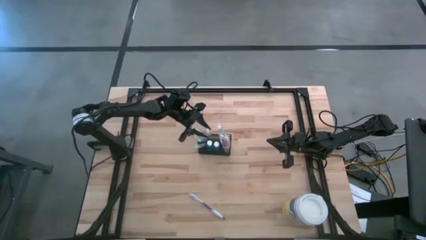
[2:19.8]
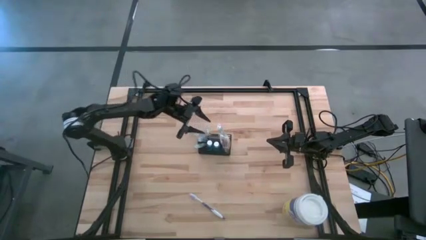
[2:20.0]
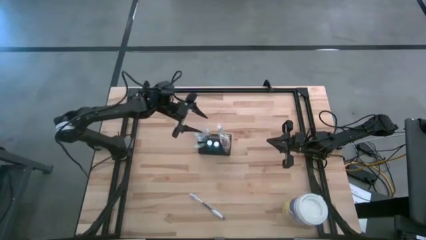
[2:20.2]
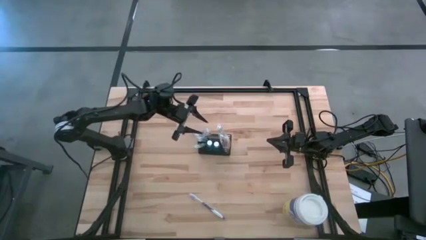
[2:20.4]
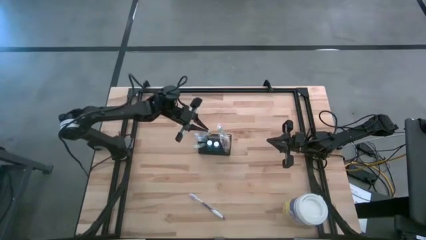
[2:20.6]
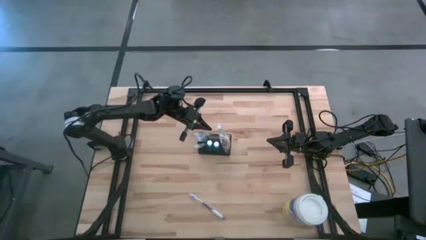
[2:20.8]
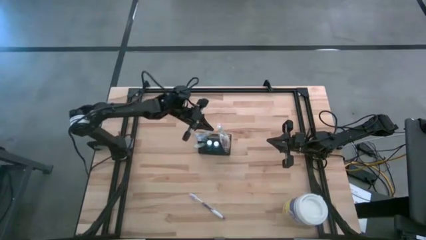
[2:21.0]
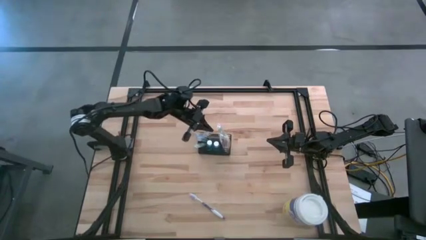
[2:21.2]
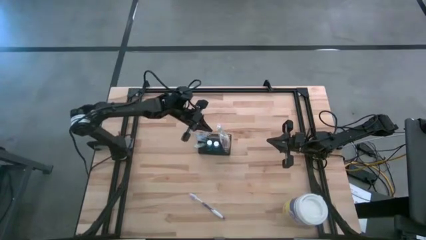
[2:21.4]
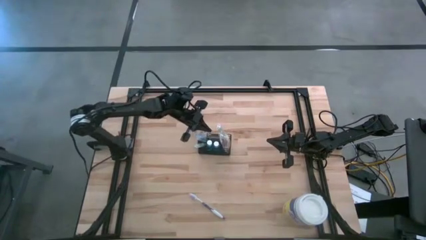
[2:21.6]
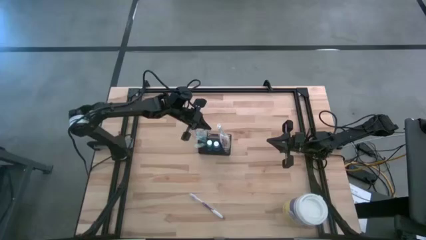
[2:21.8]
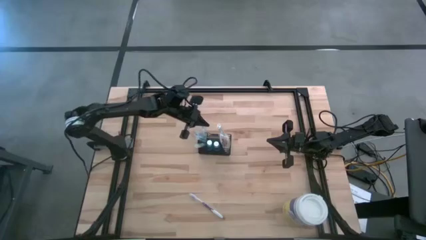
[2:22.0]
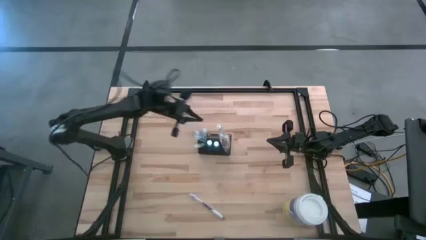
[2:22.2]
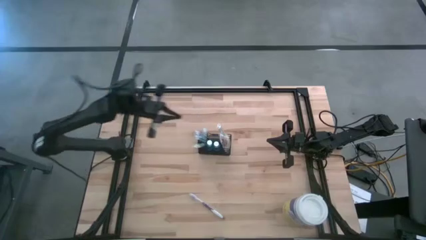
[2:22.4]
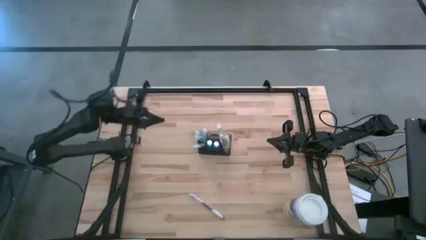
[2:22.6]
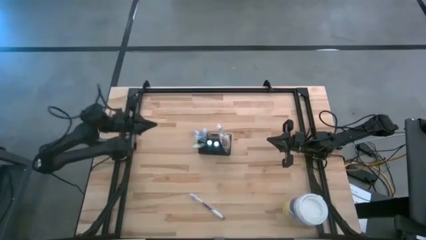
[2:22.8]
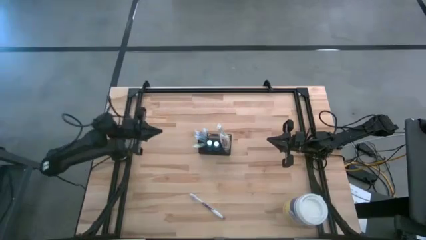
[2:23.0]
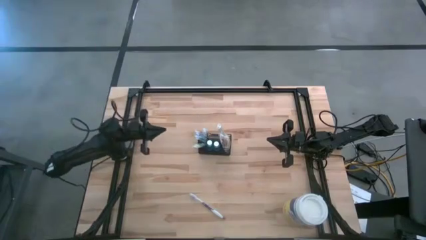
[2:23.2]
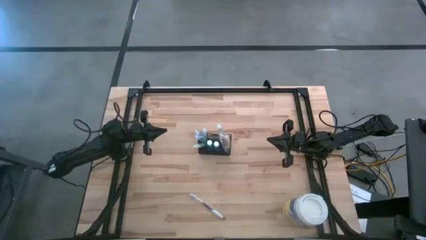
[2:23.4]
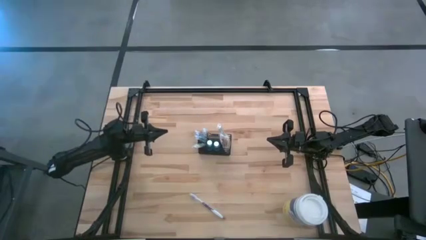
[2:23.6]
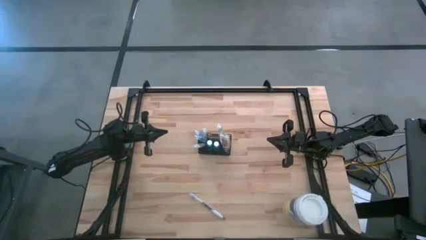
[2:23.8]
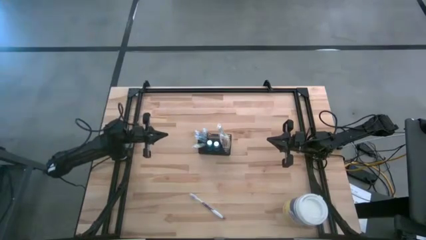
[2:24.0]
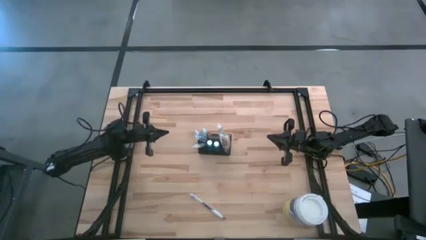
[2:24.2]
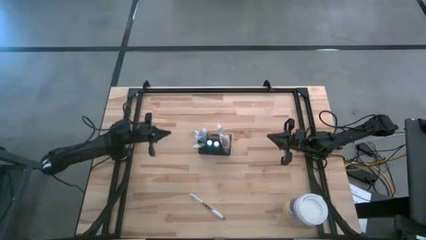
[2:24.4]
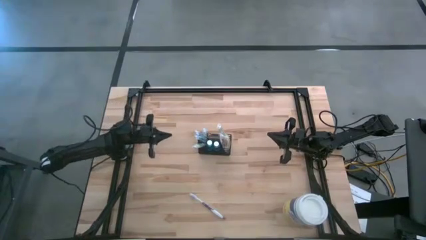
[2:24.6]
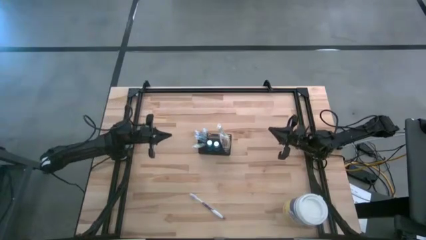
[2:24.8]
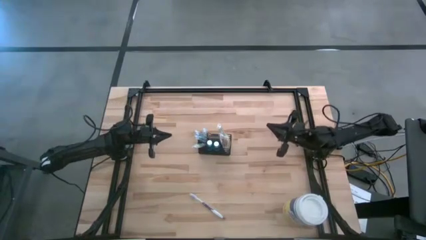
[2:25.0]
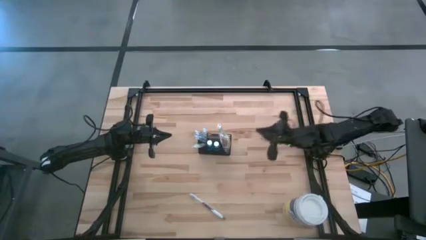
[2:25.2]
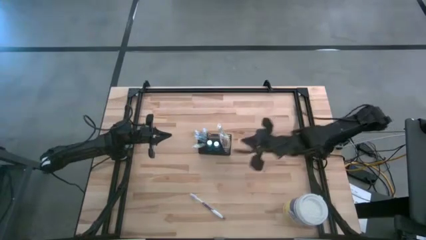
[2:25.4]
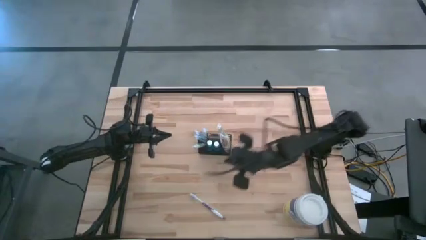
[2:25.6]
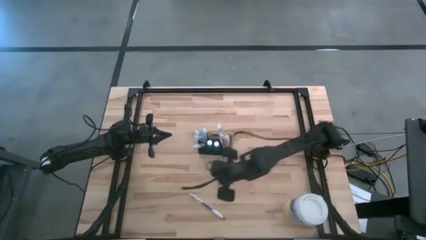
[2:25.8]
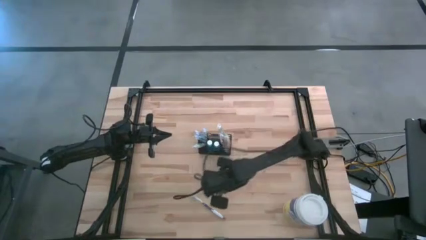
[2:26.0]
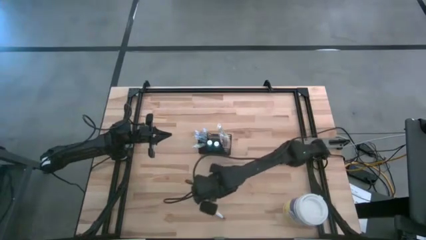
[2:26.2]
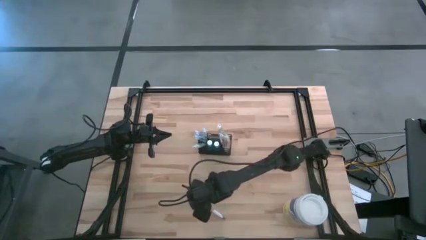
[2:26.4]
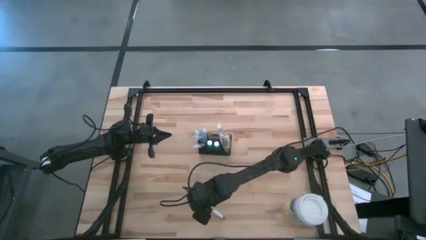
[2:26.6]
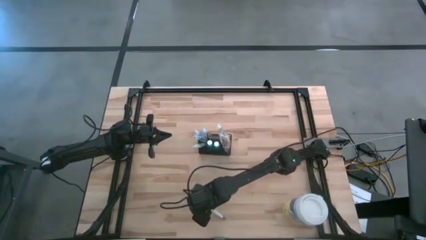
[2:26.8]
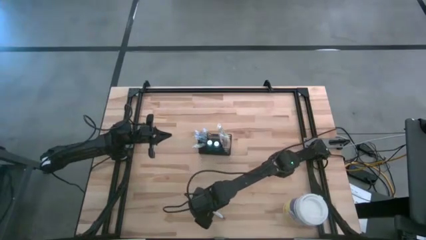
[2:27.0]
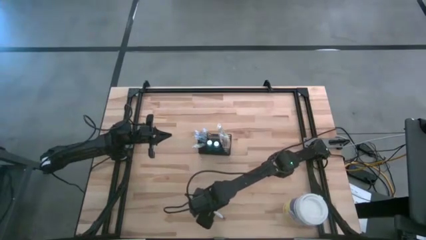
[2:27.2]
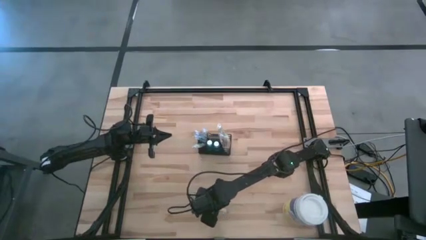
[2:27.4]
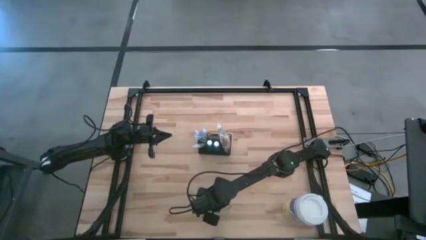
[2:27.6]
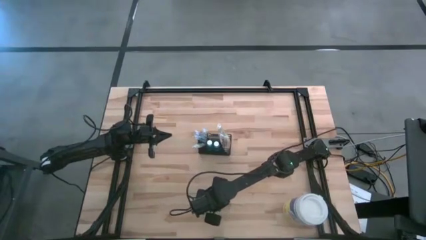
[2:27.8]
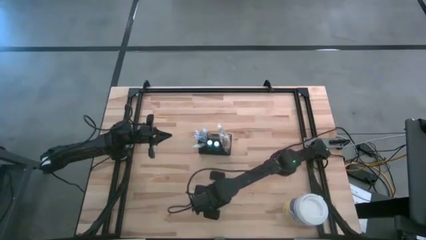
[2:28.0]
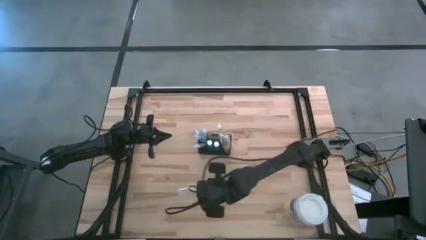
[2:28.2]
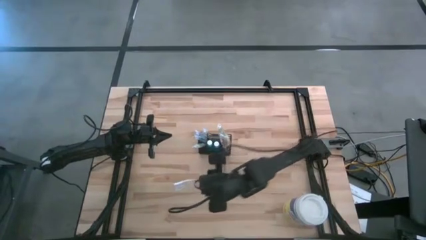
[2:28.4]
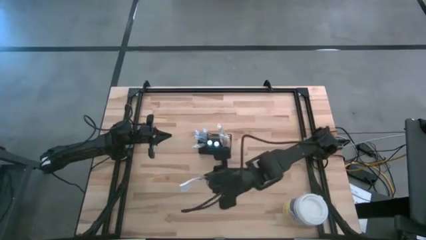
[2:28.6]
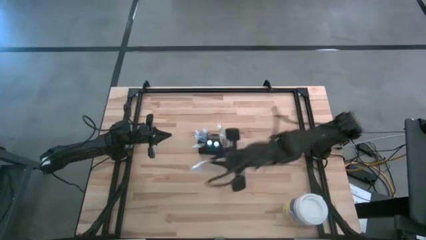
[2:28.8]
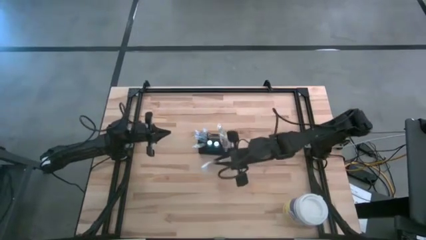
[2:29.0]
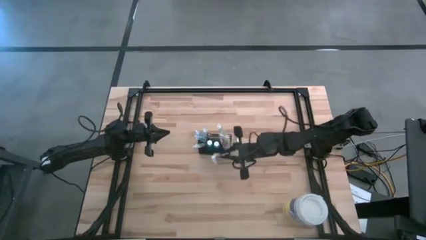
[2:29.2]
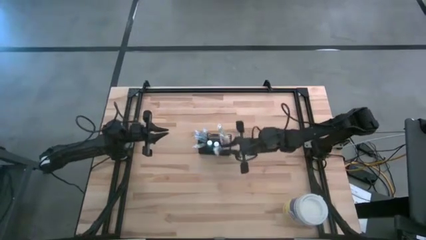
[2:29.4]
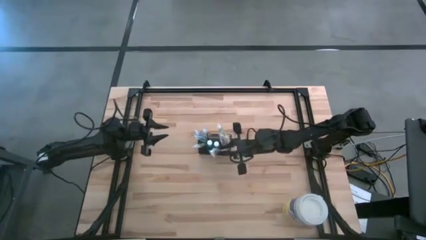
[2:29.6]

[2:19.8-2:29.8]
Task: Pick & Place toothbrushing station
Put the violet toothbrush into the black wire organizer
